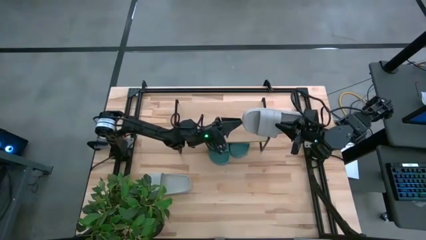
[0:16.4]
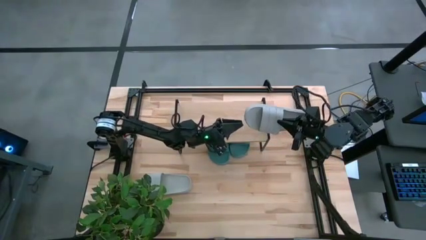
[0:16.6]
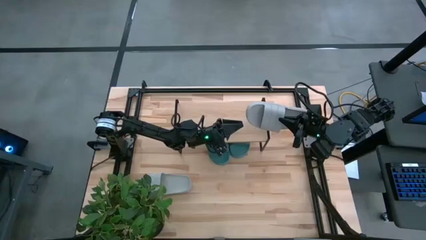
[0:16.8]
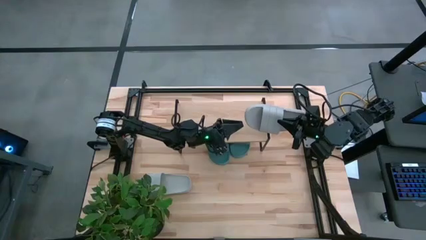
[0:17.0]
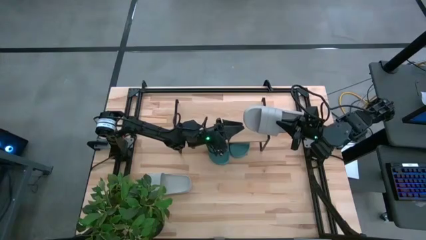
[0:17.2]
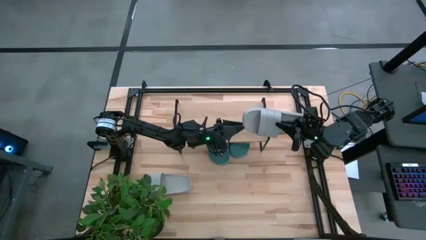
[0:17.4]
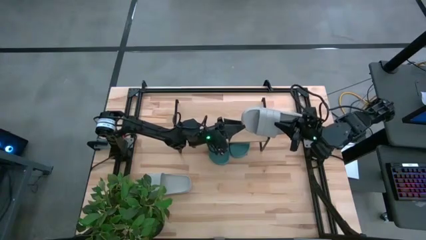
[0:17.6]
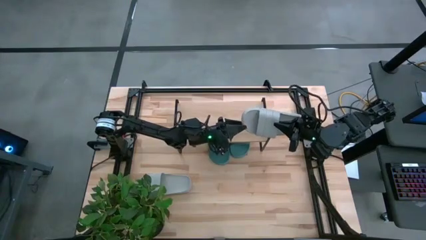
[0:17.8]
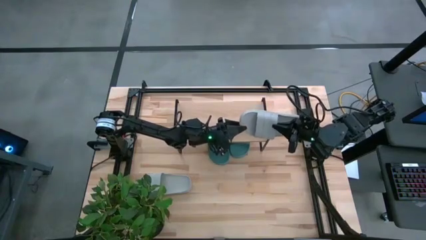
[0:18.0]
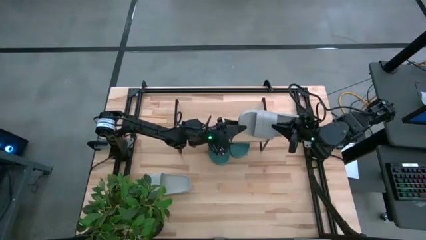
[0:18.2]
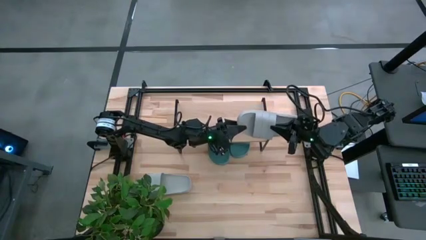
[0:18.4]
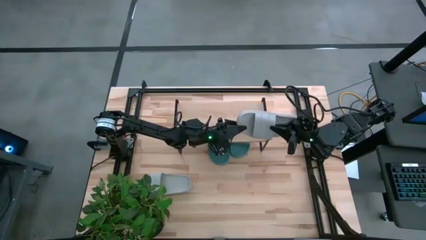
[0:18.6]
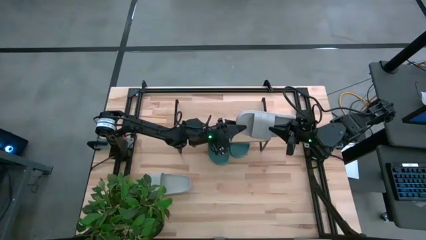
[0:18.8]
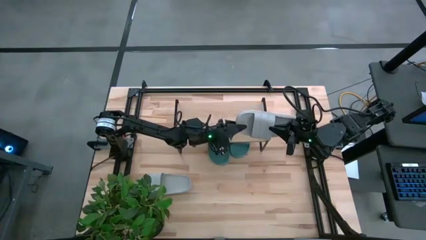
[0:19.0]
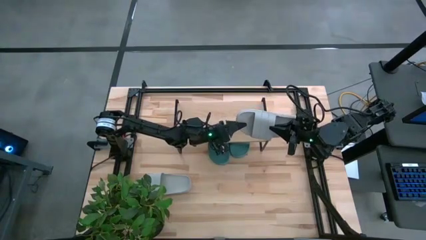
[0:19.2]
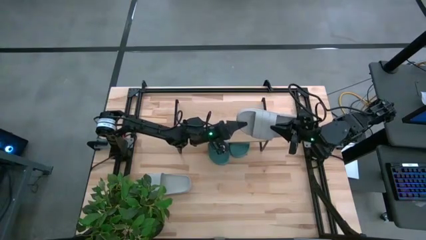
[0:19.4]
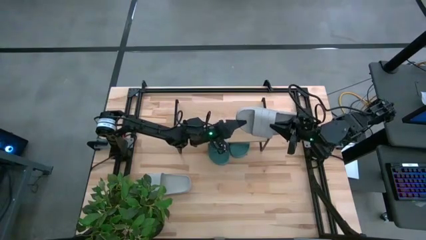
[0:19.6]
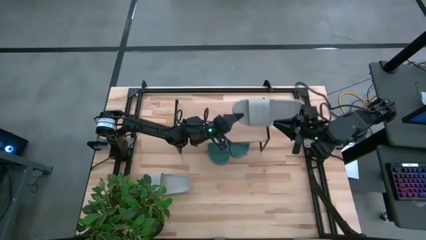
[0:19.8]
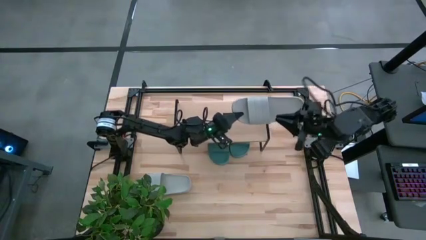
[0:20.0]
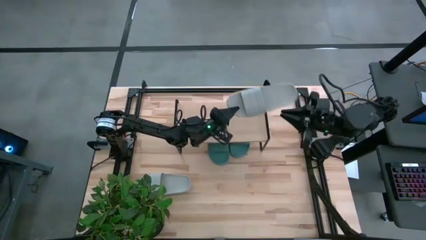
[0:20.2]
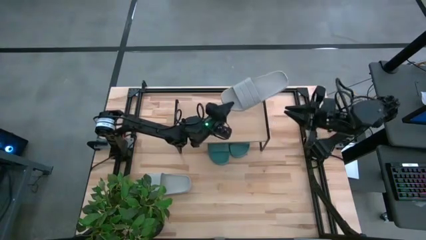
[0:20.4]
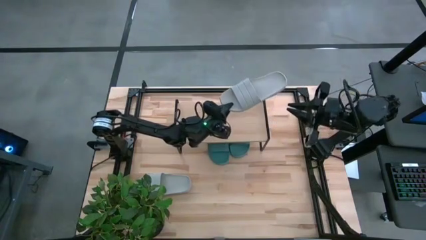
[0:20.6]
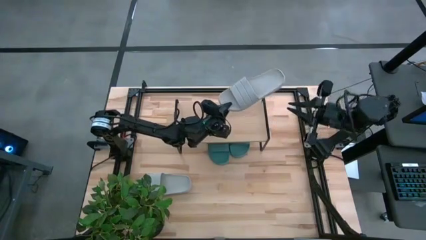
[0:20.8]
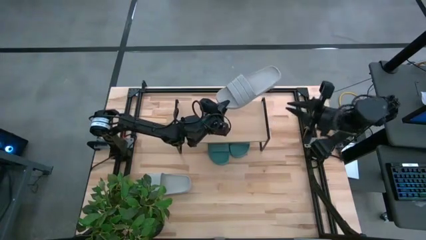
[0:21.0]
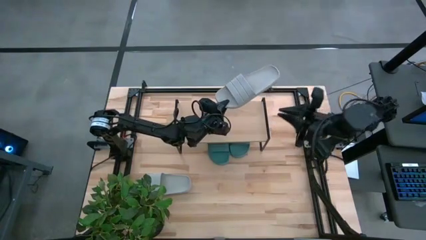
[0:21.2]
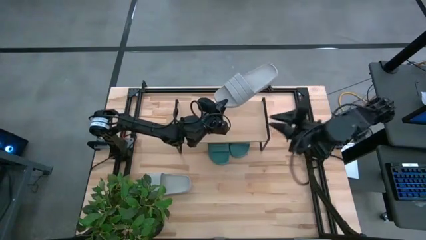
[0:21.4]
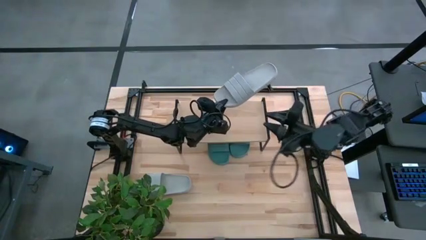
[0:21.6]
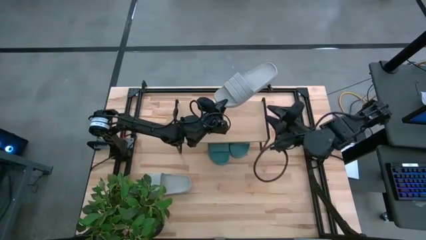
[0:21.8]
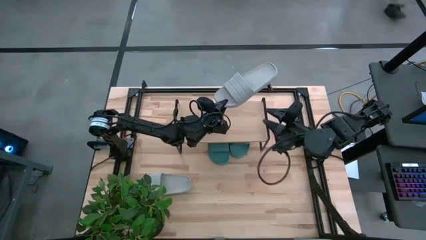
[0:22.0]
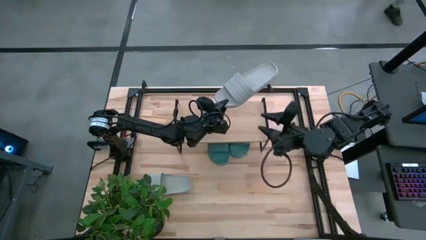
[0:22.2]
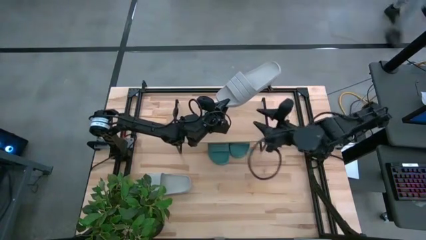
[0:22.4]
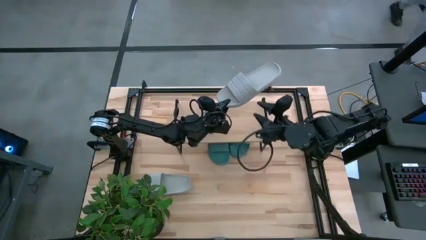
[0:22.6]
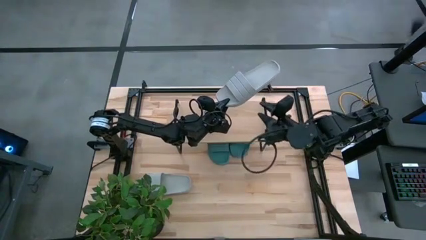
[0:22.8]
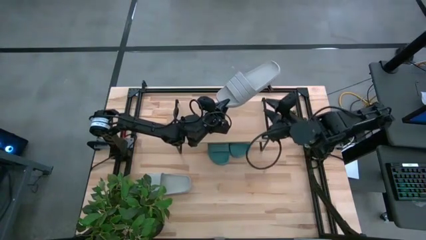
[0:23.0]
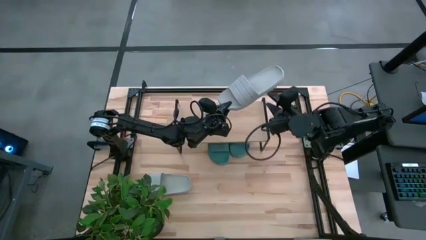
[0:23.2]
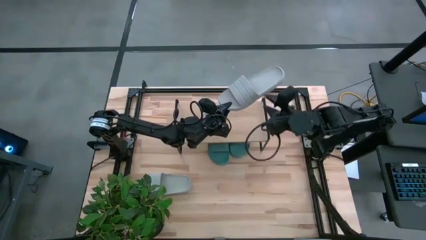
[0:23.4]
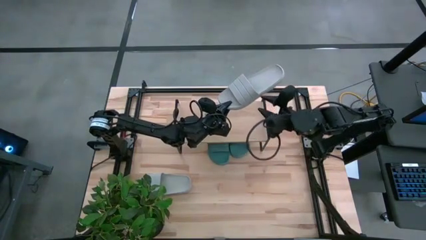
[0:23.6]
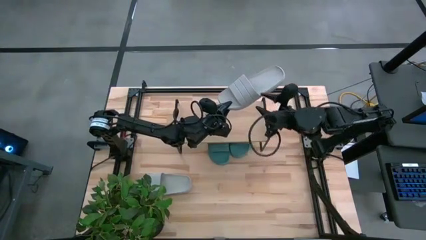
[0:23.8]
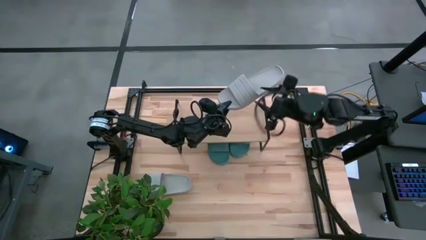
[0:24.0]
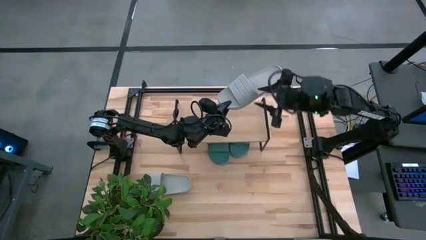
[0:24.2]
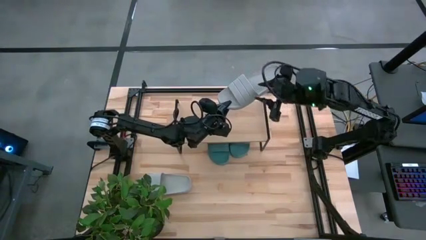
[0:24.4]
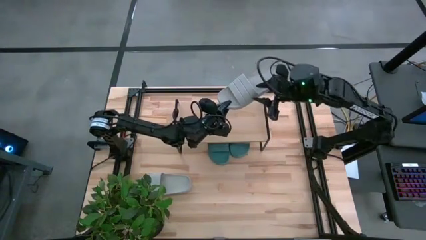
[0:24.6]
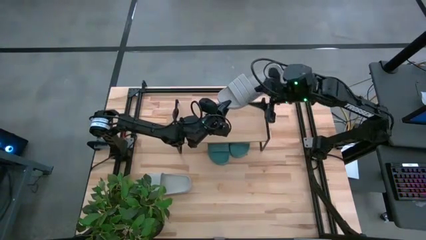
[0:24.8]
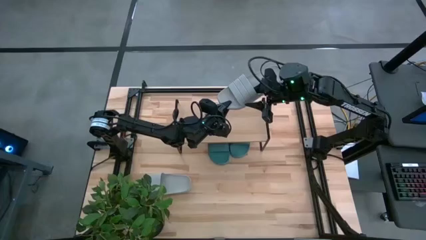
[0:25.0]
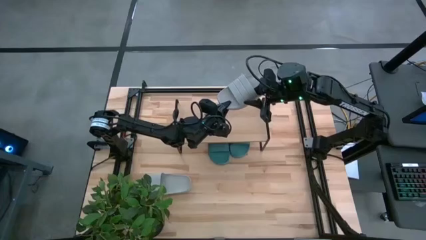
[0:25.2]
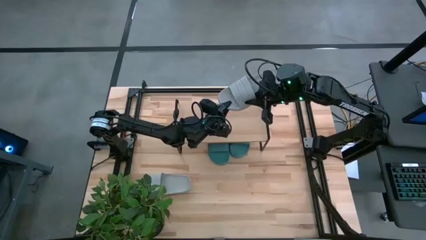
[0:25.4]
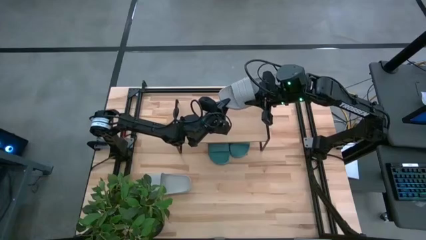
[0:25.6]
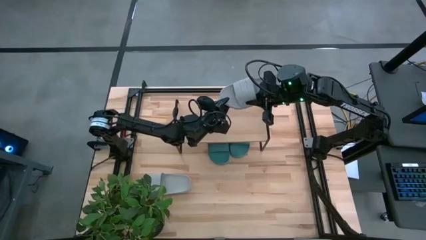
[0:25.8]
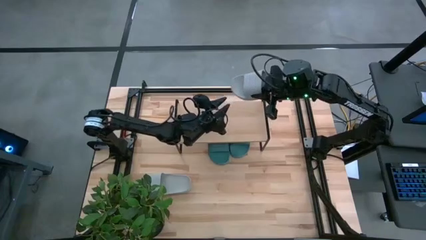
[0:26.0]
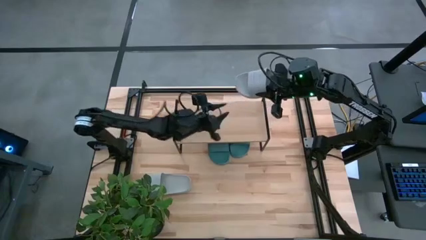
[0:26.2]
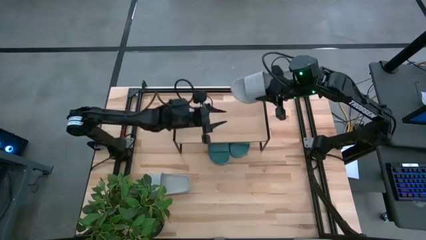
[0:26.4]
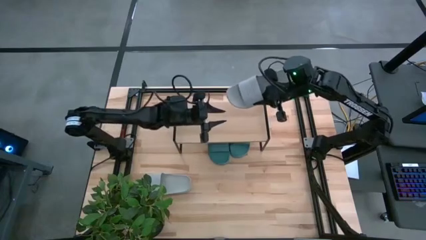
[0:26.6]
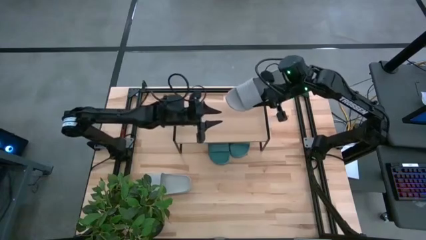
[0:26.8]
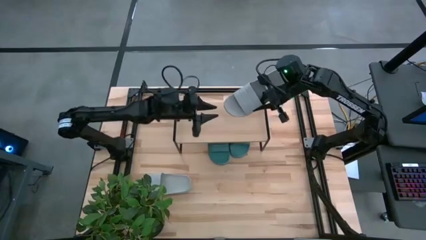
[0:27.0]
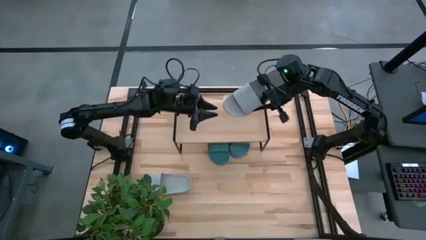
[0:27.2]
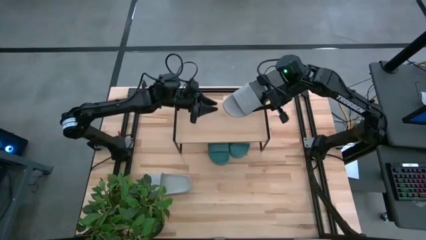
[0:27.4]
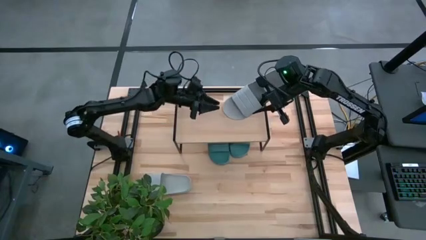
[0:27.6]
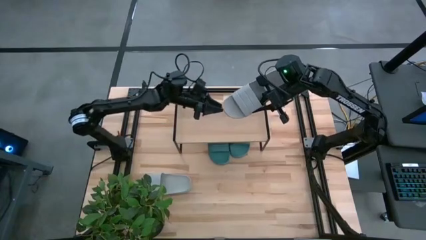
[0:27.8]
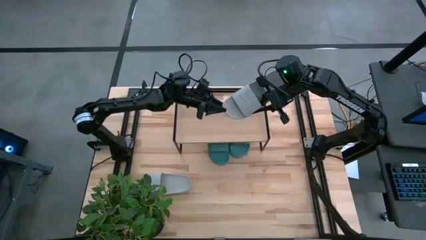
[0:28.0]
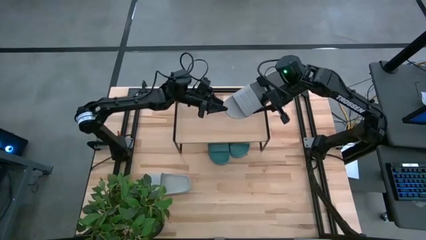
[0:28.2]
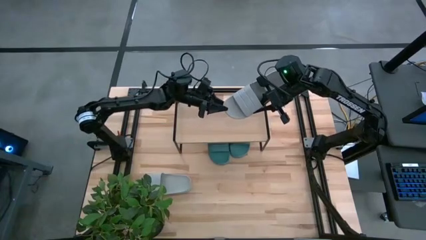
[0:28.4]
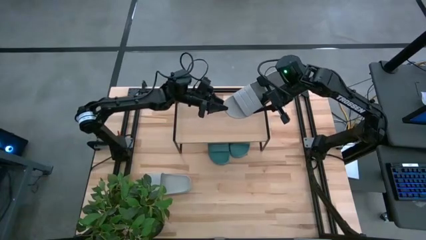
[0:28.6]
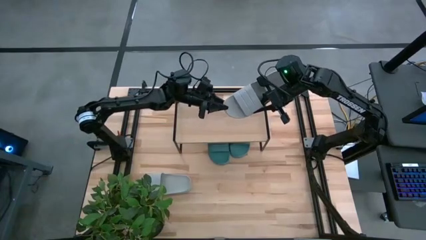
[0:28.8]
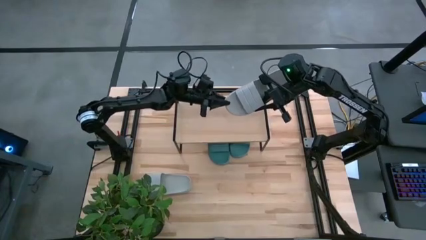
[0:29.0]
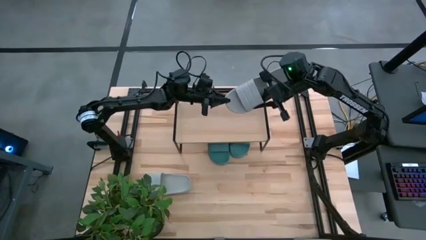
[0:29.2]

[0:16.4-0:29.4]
Task: Pick and place slides into the shelf
Put the right gray slides on the shelf

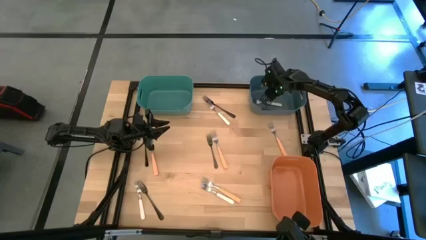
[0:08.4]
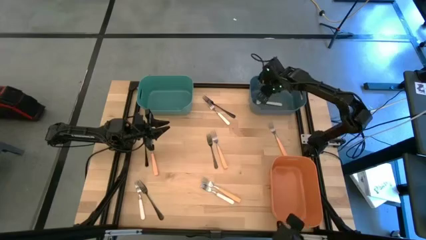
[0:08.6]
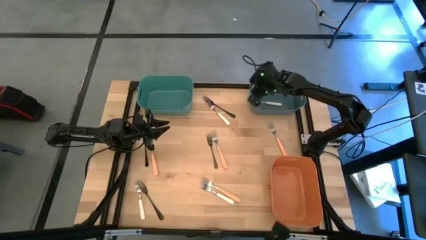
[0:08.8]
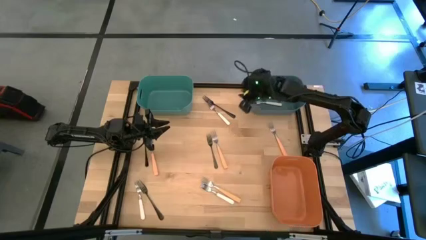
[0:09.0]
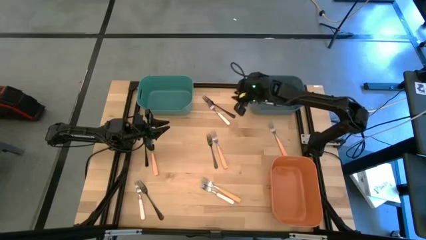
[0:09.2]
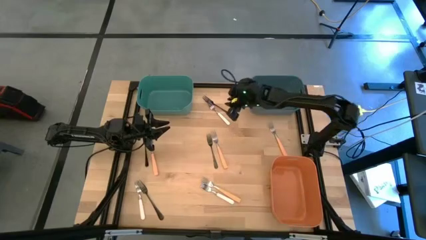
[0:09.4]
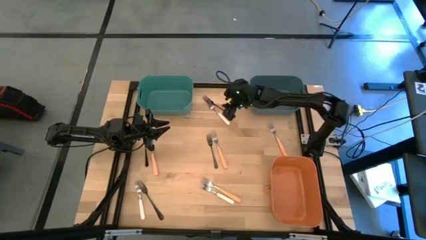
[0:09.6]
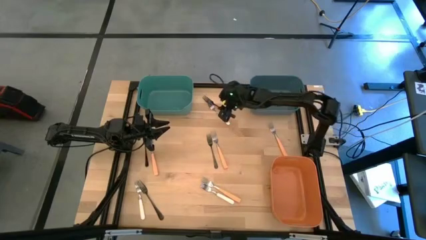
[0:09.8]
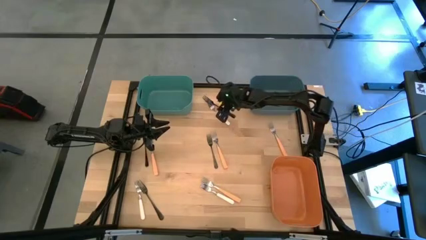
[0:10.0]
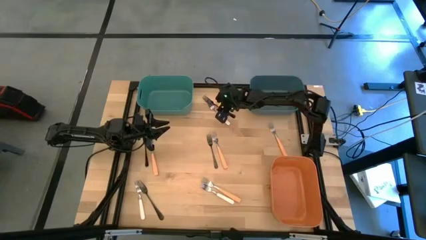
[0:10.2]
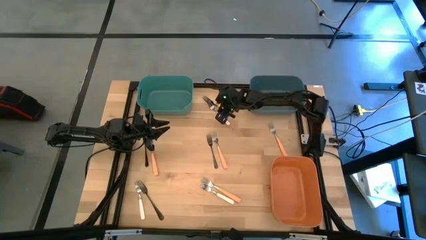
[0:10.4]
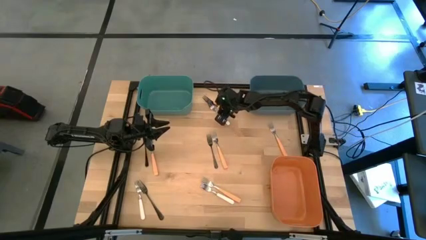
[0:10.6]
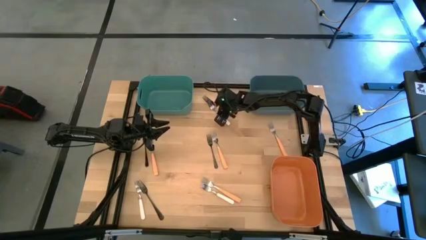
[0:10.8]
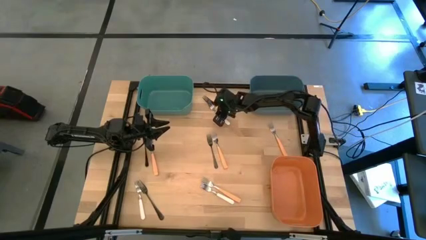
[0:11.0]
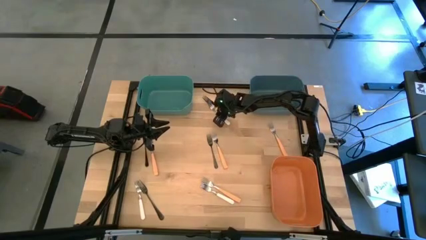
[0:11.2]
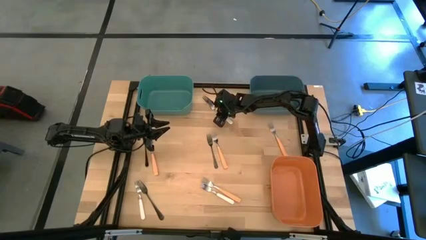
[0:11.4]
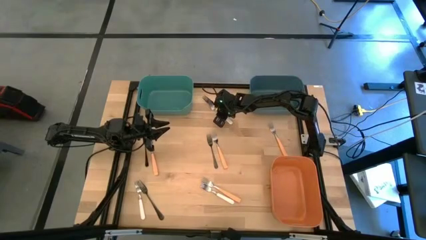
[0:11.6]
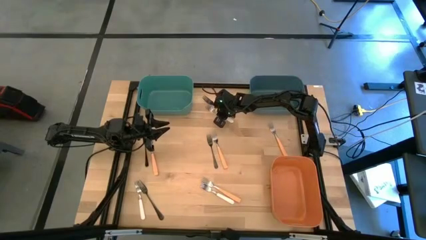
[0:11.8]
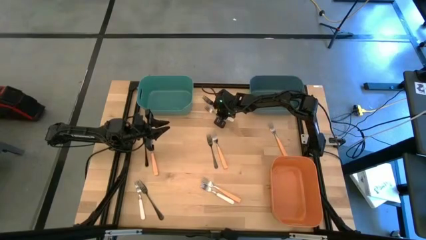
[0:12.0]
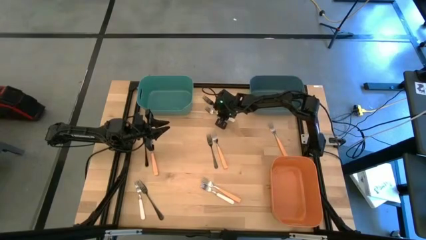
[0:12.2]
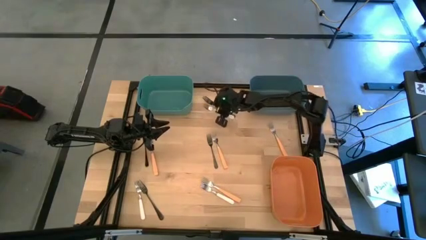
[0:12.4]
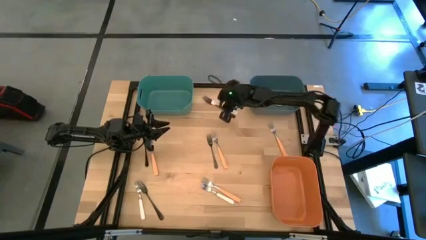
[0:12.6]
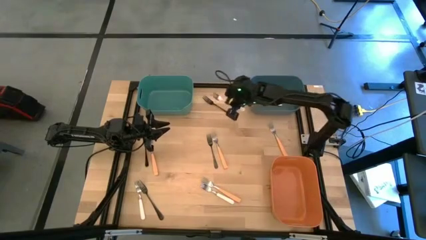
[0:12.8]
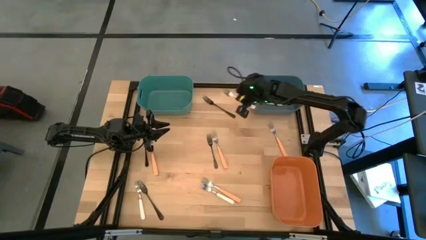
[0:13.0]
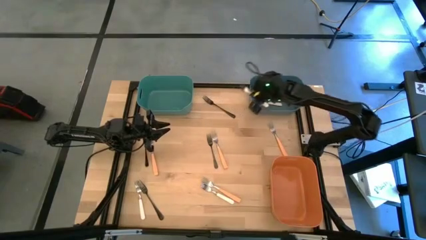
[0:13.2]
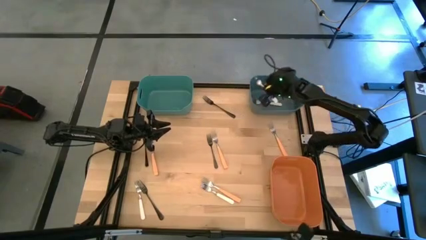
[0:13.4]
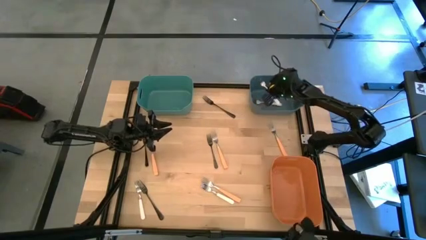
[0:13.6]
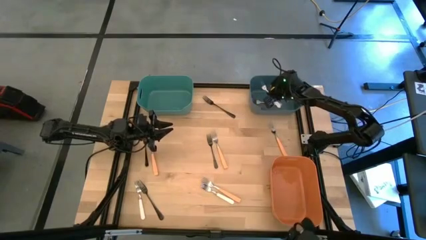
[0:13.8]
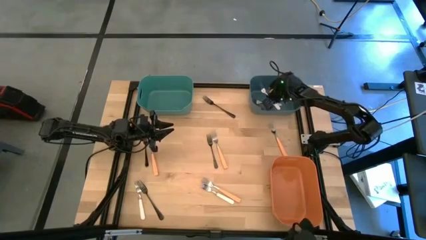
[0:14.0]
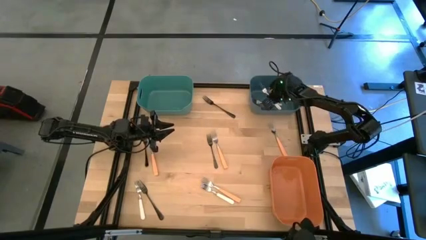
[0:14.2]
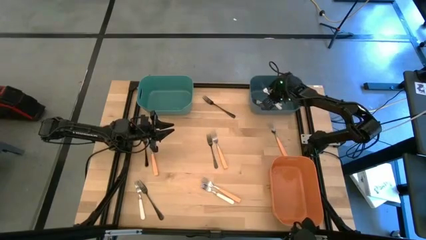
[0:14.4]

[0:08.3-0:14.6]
Task: Sort silverware by color (type)
Put the white fork into the bin
